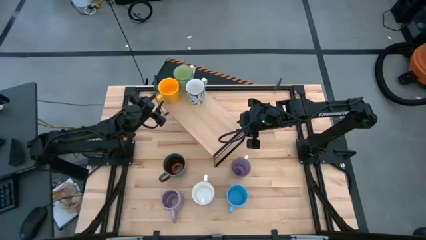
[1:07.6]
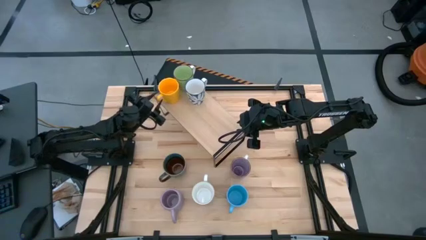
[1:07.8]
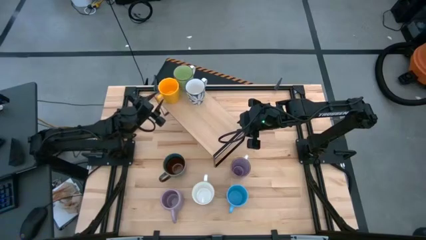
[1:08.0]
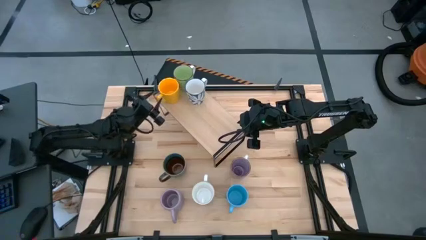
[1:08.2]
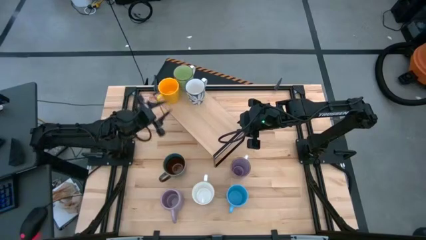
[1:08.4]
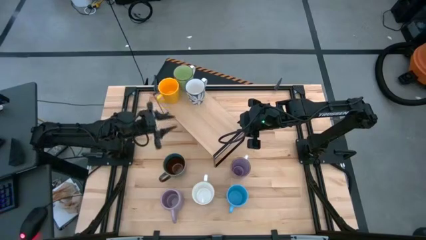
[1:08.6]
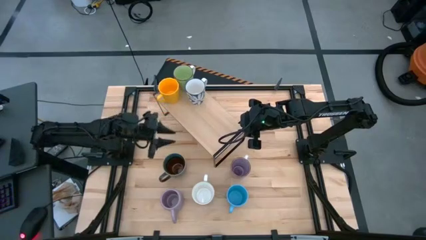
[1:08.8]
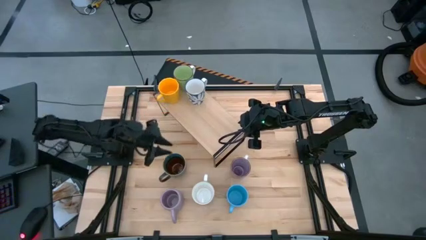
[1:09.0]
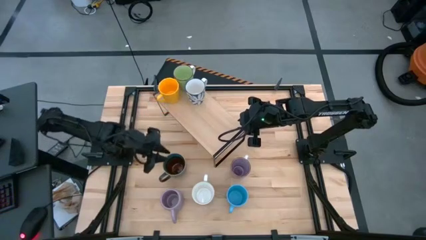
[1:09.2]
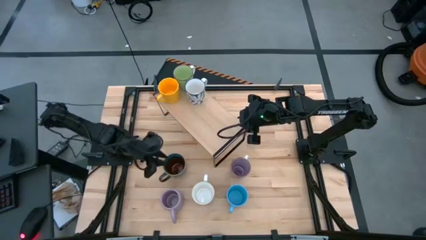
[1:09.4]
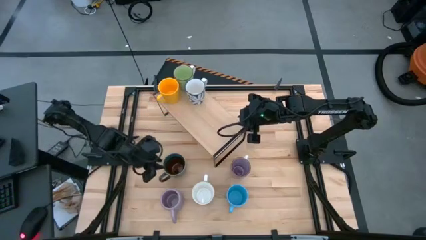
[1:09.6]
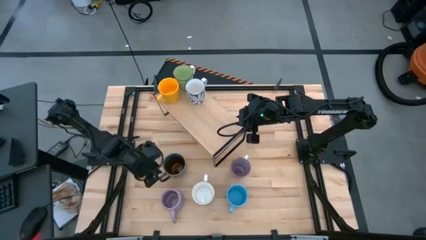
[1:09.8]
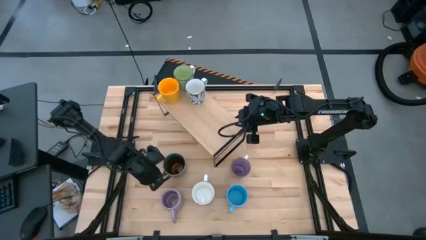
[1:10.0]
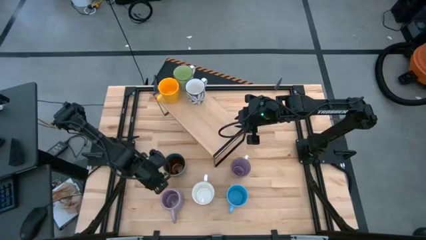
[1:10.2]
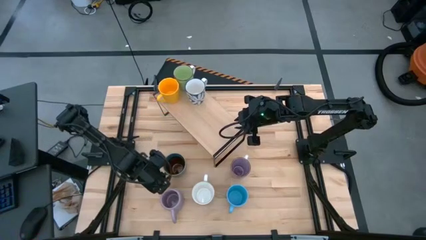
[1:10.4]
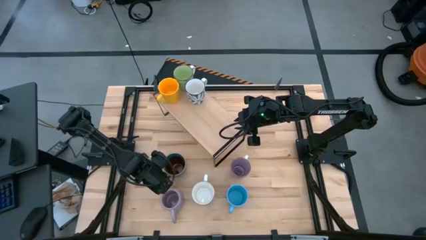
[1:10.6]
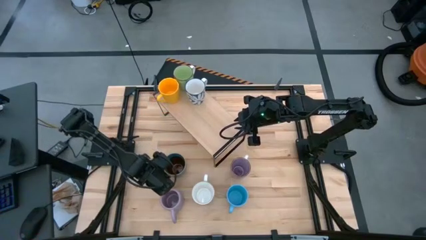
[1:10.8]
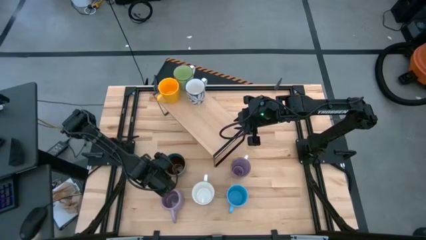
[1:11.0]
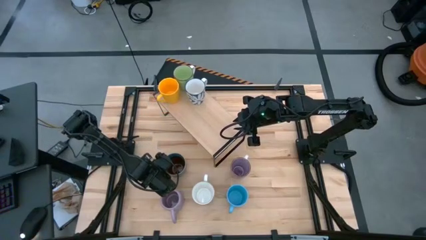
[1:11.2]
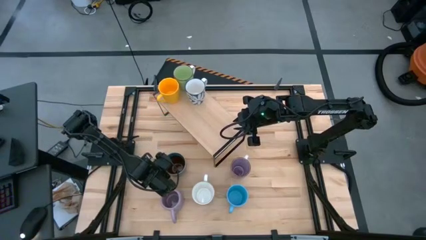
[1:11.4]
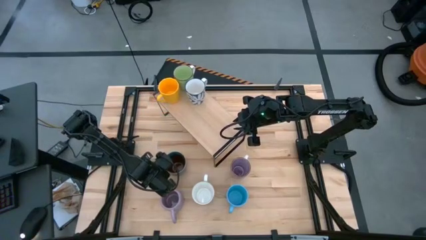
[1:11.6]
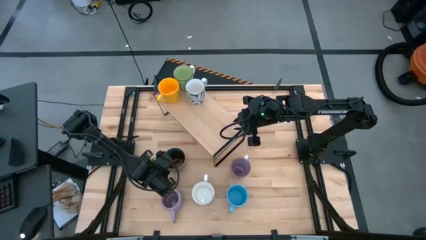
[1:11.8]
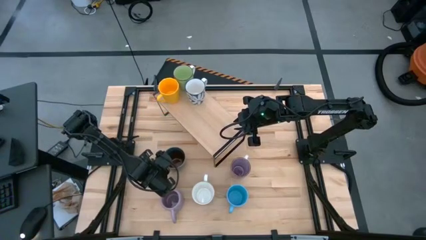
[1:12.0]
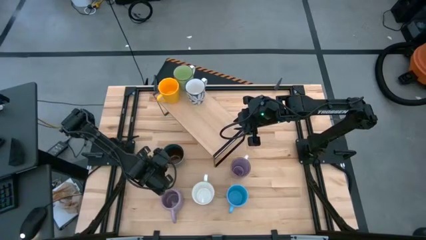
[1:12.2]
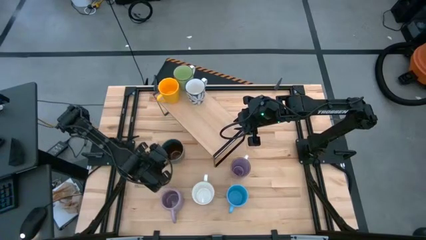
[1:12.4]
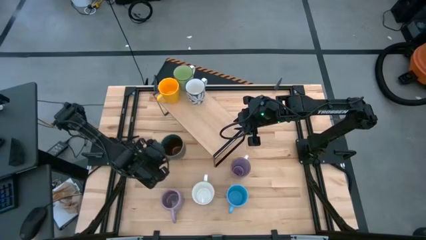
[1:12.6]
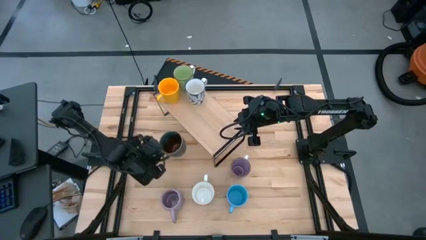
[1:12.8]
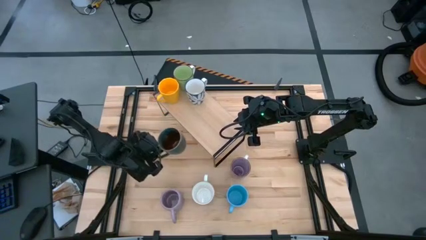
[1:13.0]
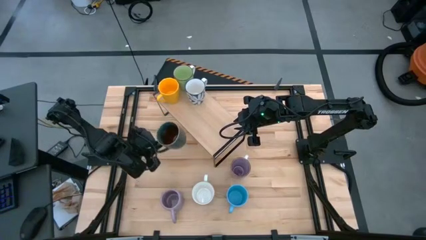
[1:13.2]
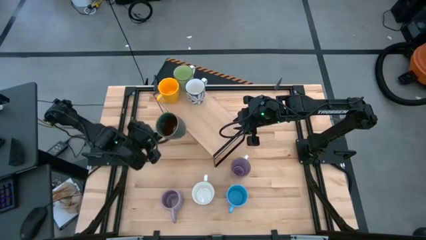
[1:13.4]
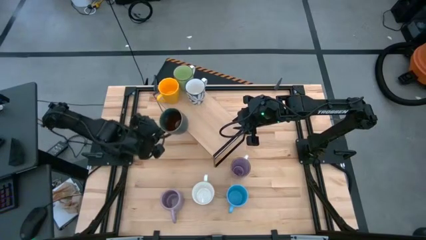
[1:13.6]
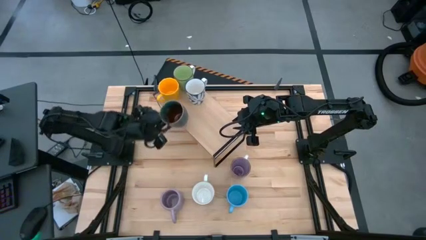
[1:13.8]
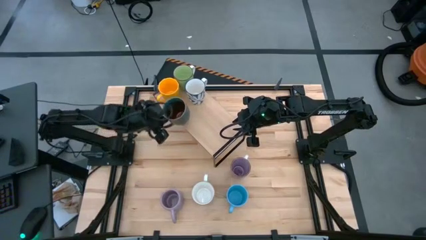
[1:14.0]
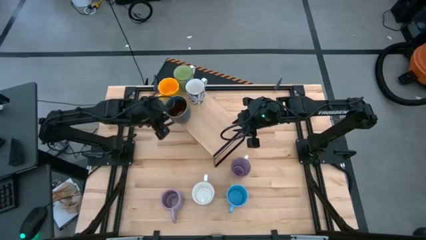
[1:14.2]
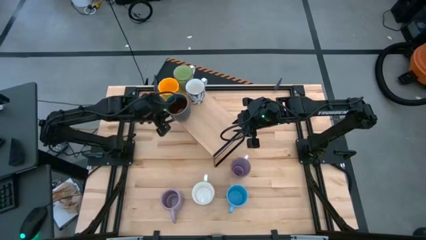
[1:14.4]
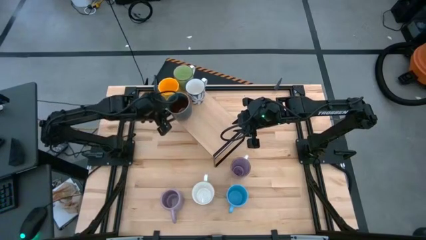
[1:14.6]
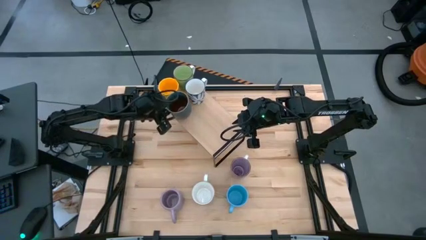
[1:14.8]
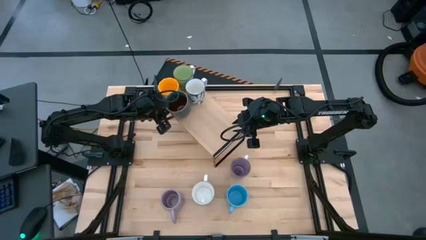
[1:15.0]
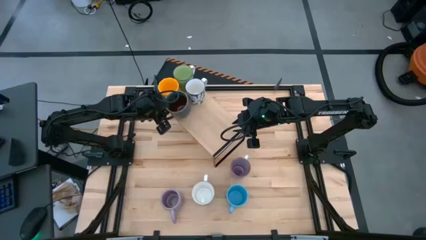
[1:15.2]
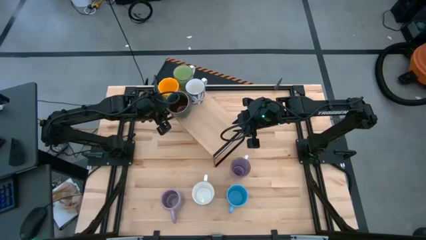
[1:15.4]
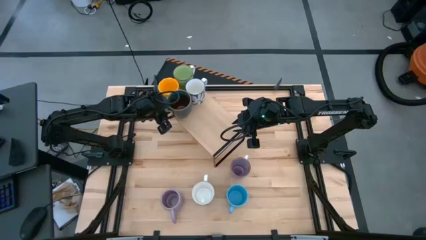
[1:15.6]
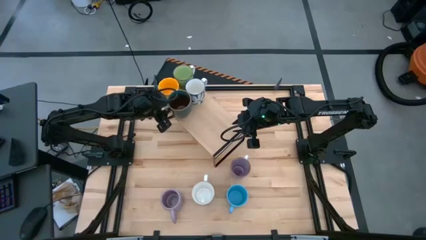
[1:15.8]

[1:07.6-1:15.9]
Task: Place coffee mugs
Put the green-blue patterned mug on the shelf

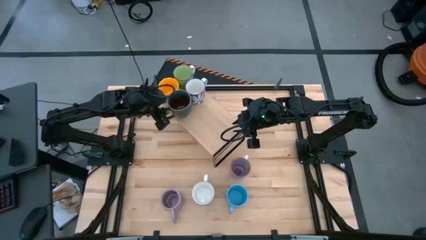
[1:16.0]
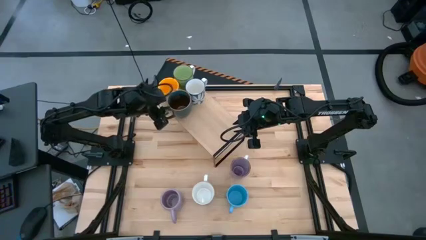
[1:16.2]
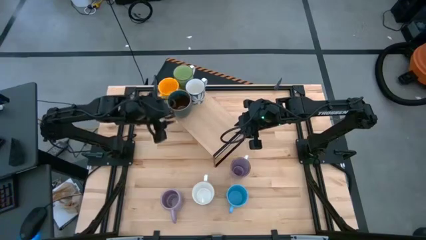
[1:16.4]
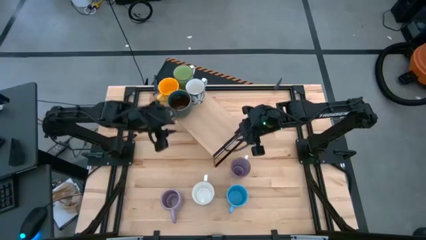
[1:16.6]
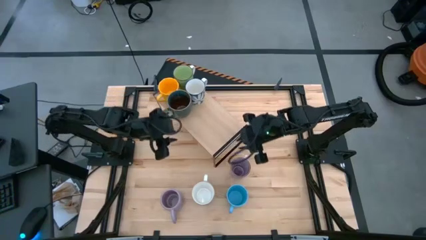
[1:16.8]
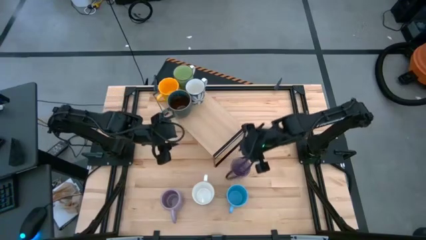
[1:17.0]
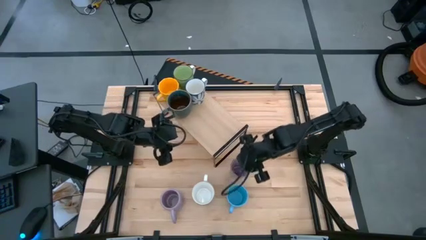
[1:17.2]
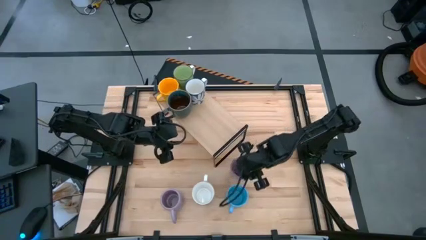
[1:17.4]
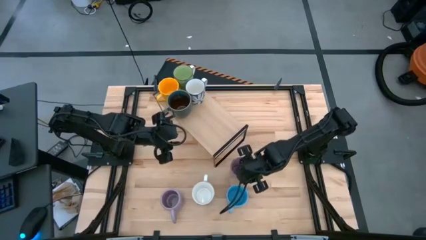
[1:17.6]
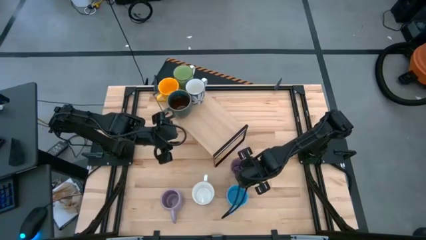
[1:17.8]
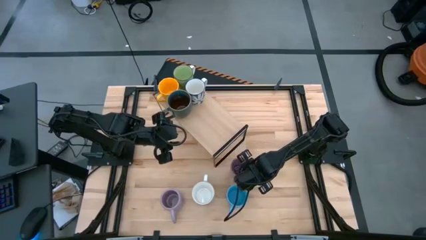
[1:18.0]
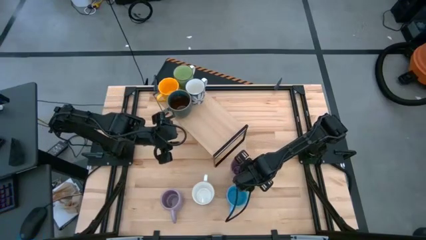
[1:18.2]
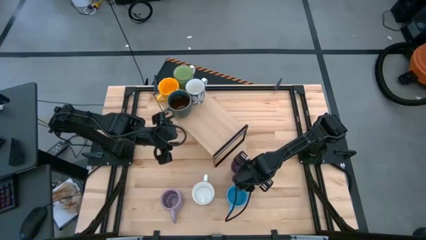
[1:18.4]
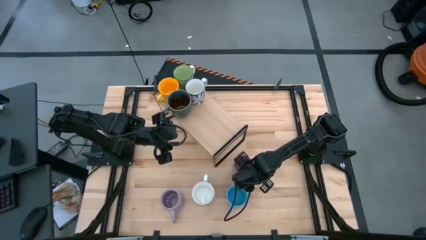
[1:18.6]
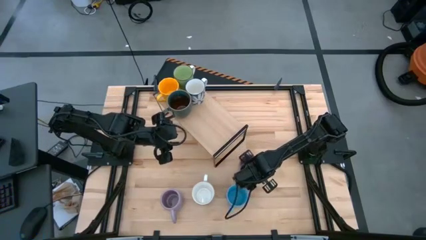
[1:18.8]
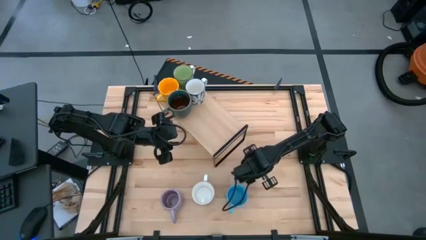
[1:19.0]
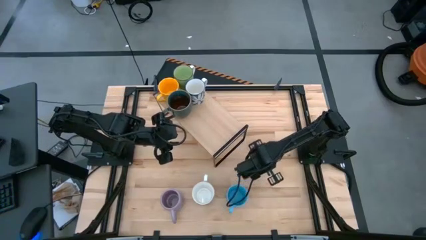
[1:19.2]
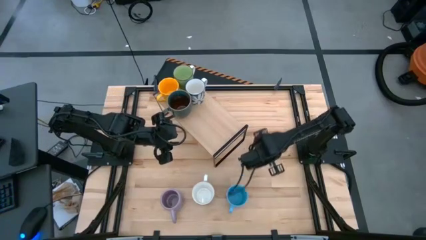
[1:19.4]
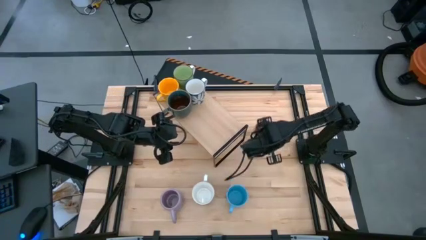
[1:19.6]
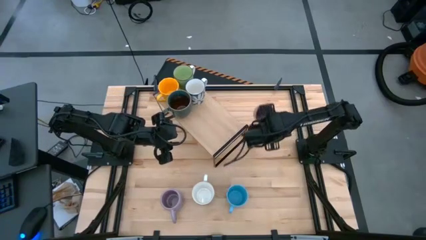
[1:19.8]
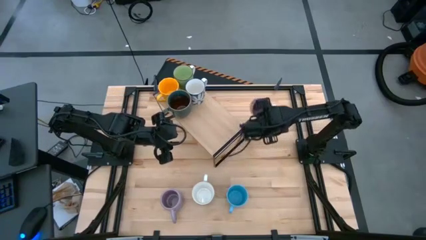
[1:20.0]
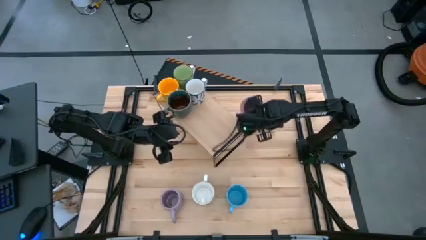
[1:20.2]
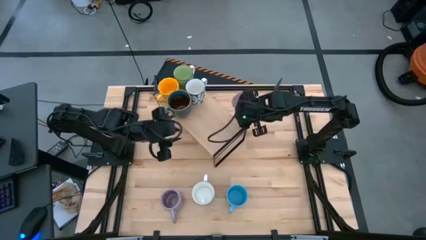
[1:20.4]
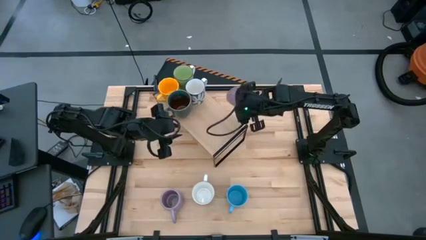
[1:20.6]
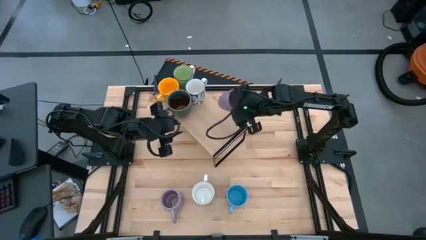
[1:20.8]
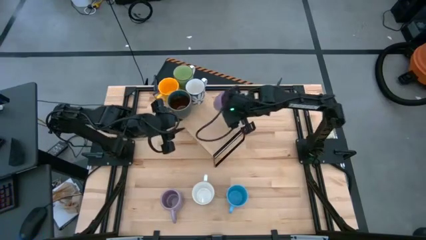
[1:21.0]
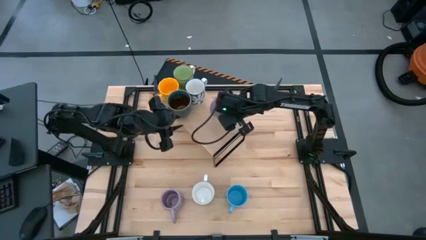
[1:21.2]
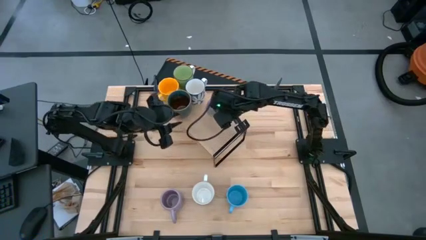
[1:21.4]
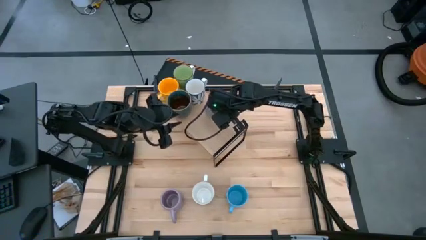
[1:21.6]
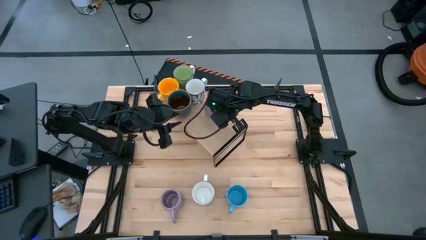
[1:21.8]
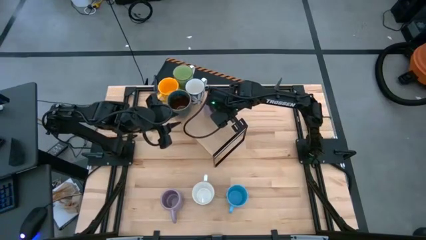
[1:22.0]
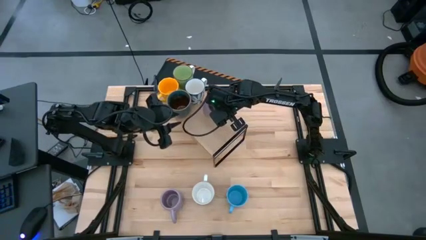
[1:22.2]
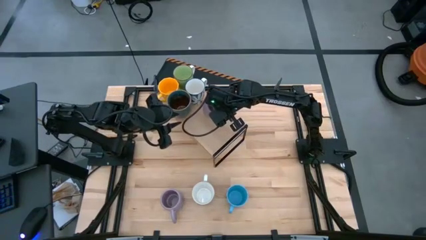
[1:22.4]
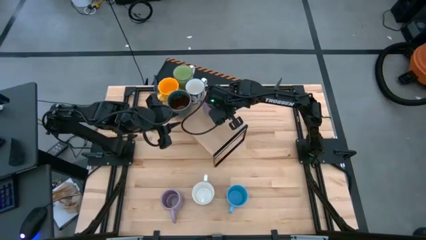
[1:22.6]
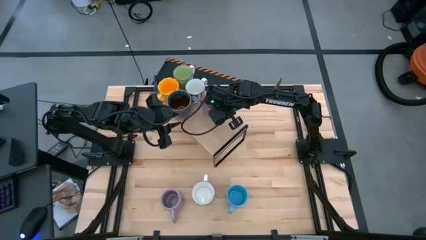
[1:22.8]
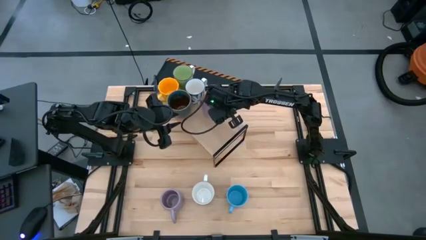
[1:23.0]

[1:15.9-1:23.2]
Put the purple patterned mug on the shelf

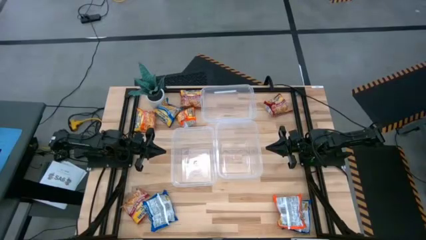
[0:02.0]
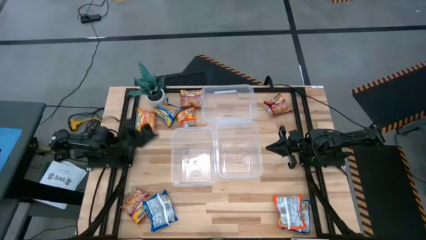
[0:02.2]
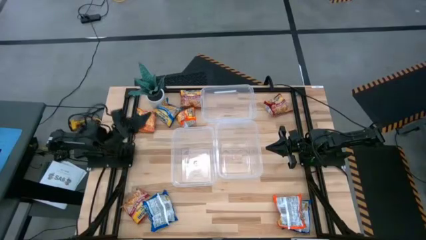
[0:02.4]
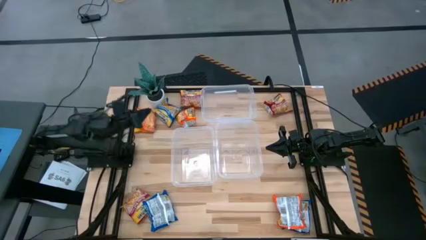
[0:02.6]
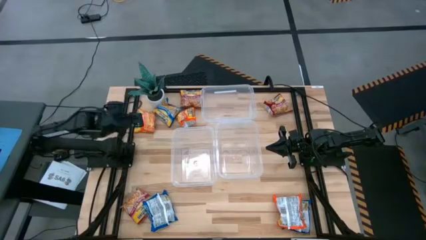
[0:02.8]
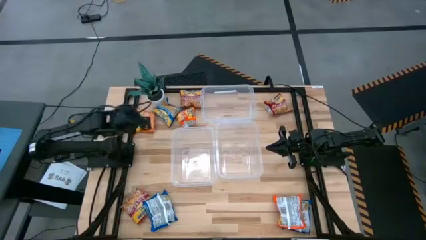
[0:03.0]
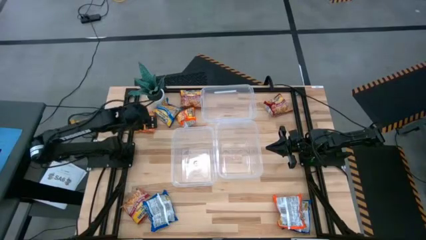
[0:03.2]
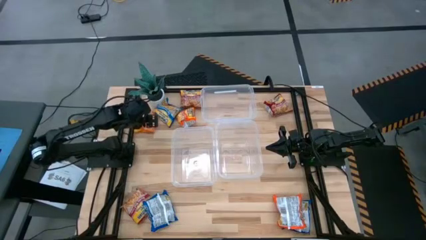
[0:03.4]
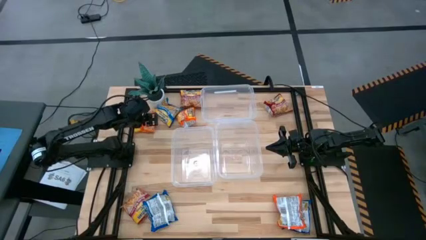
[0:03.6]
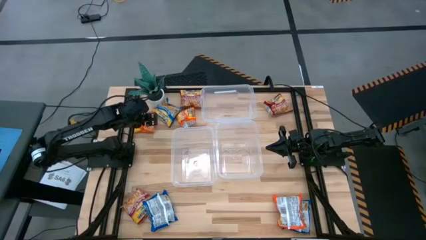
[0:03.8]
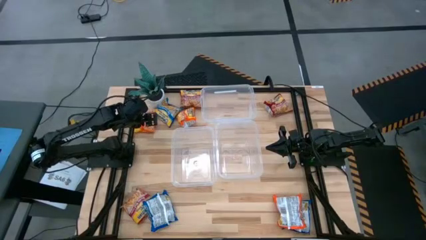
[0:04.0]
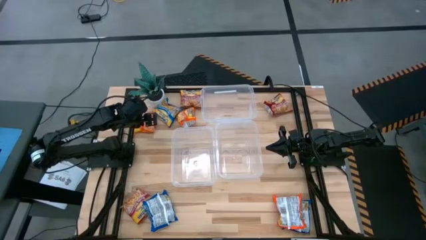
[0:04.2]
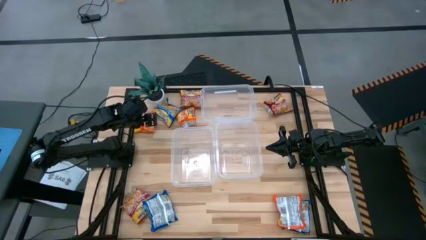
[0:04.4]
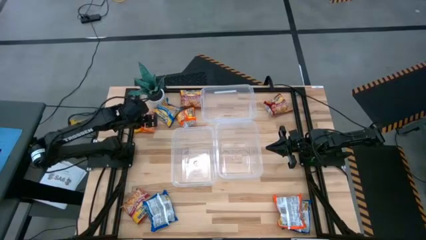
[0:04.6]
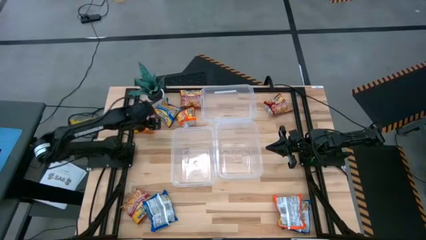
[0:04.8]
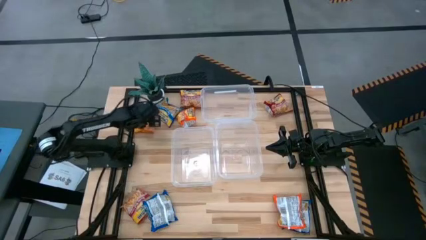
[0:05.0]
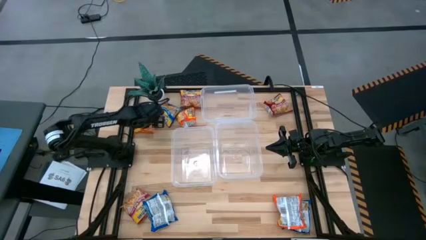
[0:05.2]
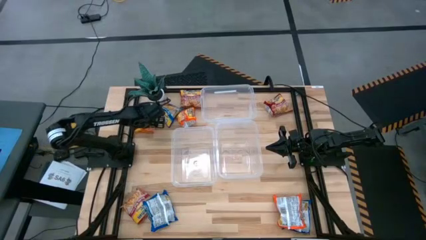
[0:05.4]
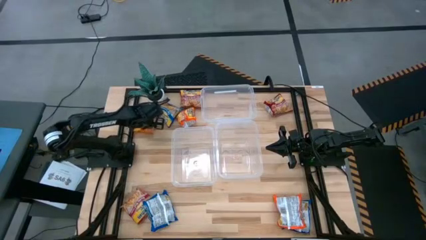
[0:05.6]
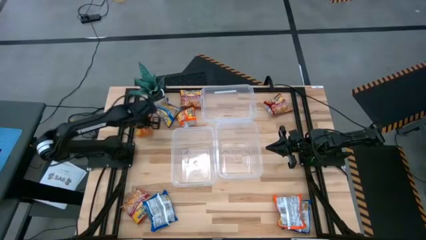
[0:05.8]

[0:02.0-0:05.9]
Task: Sort Maruchan noodles
Put the top left orange noodle pack into the top transparent bin
